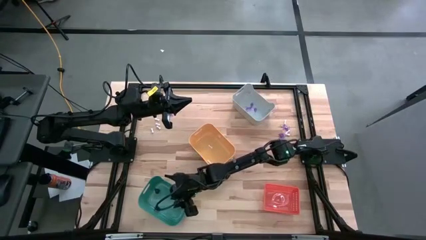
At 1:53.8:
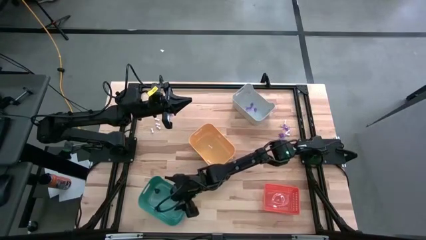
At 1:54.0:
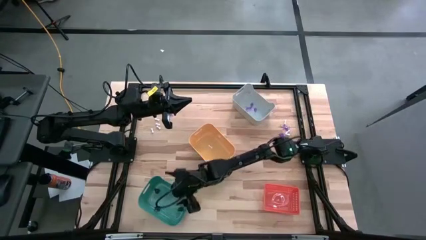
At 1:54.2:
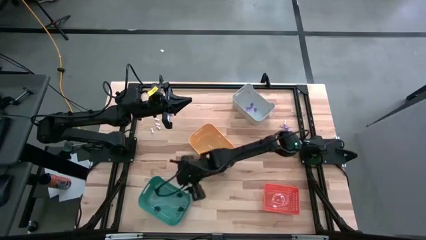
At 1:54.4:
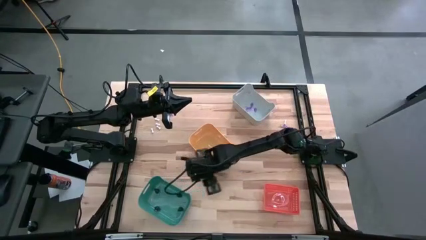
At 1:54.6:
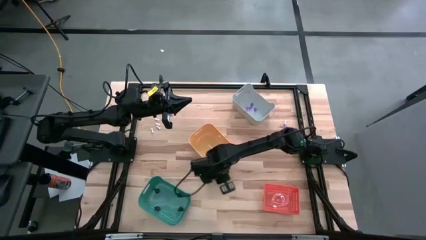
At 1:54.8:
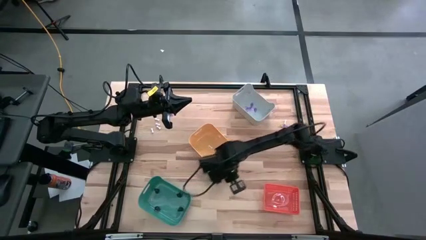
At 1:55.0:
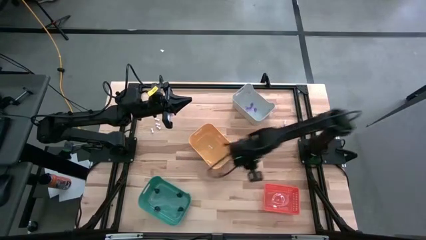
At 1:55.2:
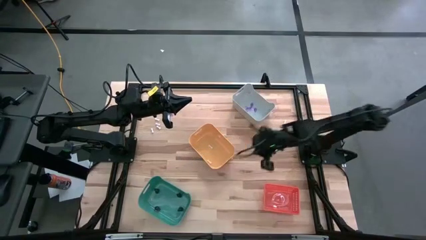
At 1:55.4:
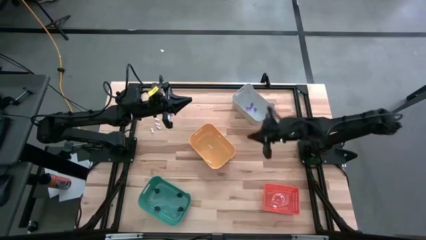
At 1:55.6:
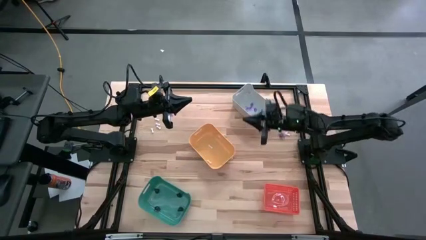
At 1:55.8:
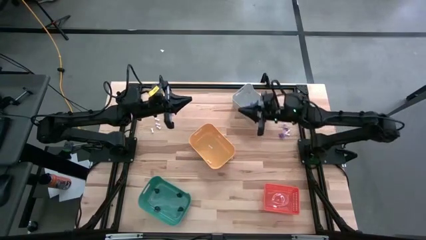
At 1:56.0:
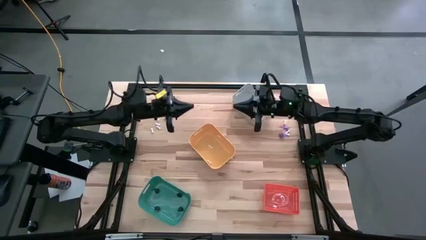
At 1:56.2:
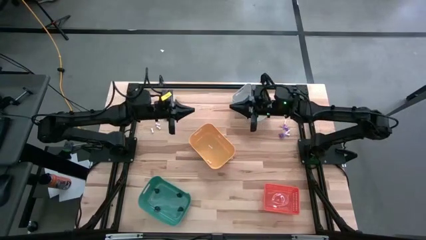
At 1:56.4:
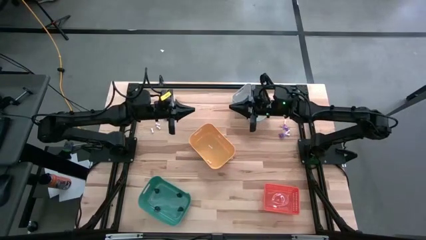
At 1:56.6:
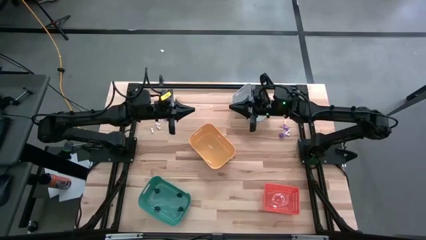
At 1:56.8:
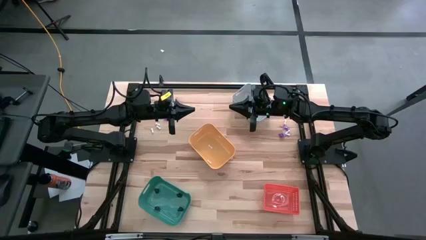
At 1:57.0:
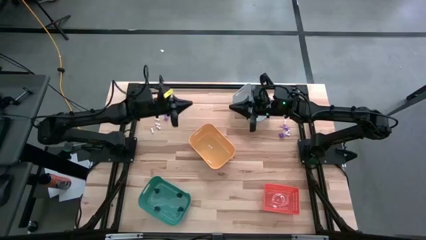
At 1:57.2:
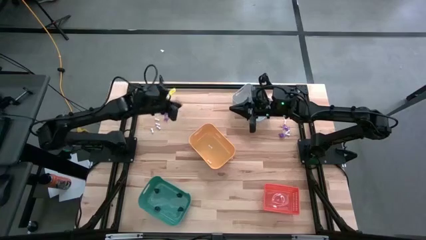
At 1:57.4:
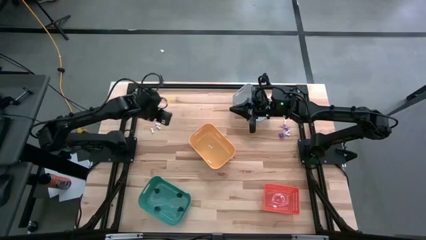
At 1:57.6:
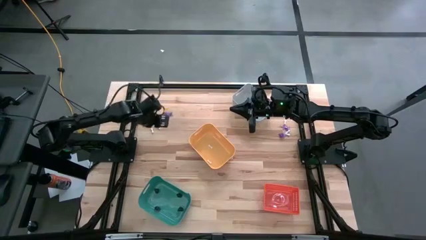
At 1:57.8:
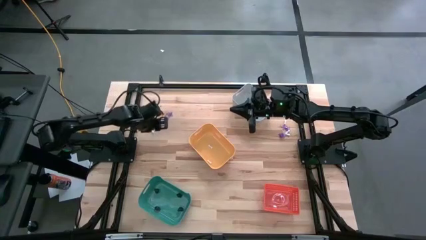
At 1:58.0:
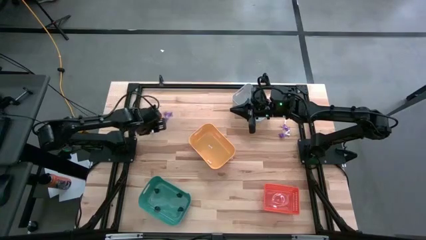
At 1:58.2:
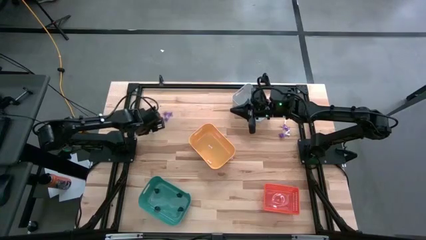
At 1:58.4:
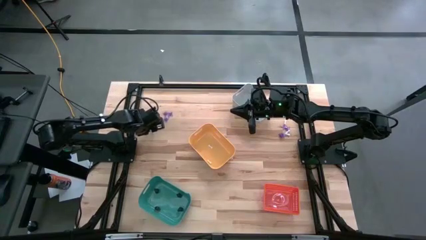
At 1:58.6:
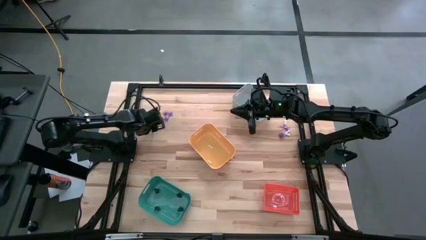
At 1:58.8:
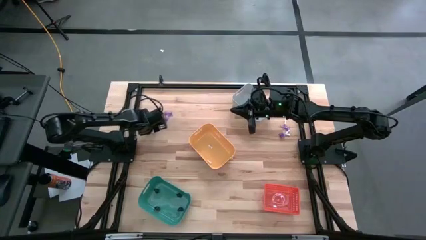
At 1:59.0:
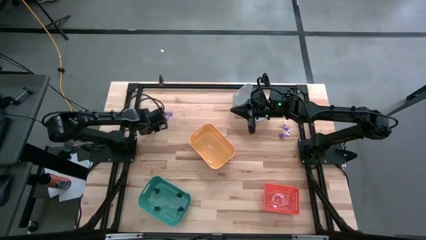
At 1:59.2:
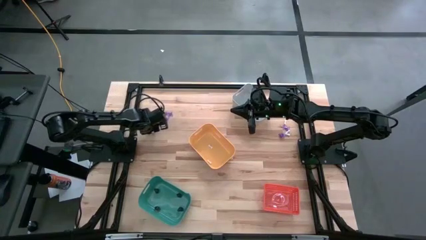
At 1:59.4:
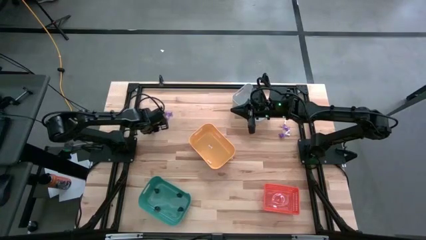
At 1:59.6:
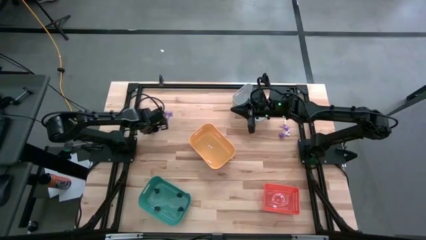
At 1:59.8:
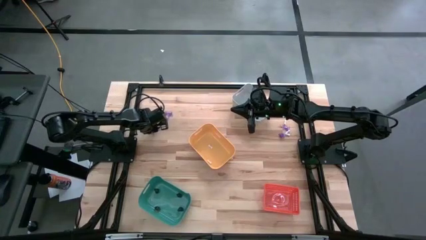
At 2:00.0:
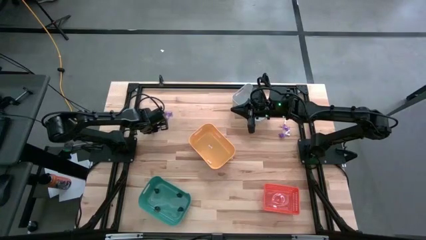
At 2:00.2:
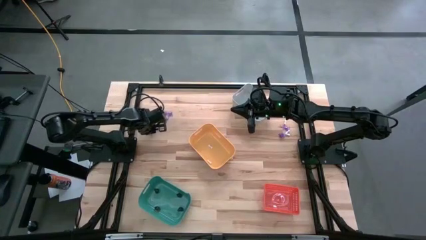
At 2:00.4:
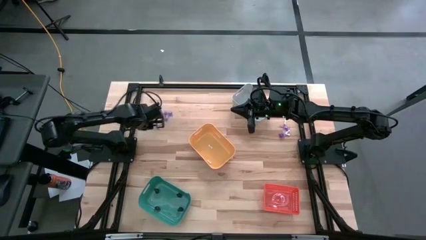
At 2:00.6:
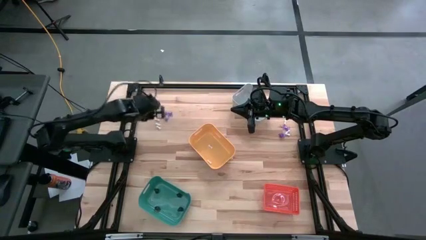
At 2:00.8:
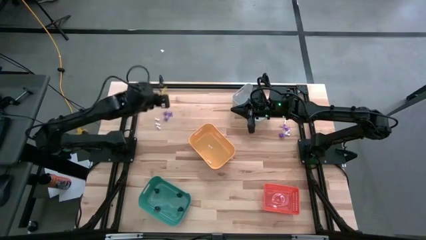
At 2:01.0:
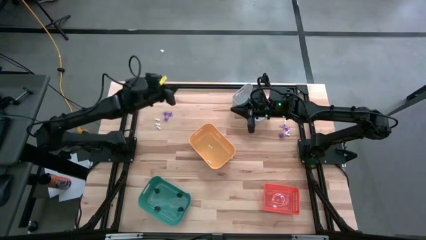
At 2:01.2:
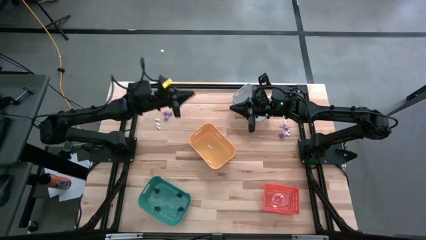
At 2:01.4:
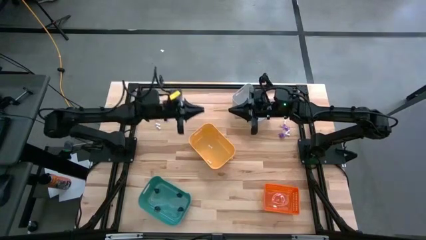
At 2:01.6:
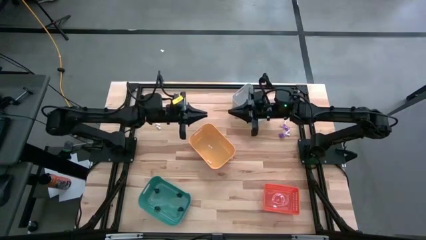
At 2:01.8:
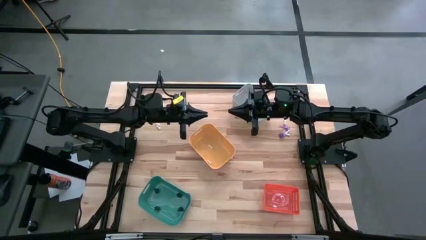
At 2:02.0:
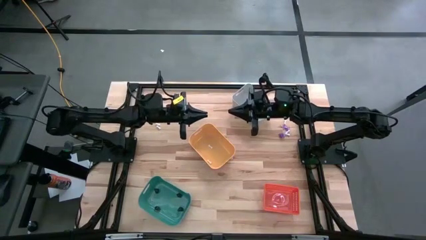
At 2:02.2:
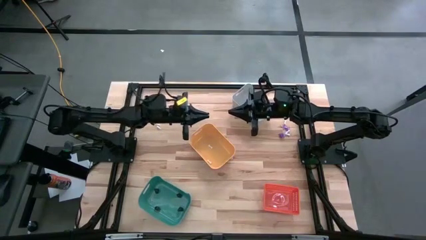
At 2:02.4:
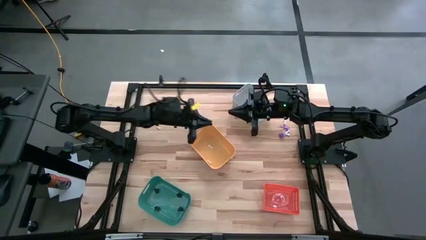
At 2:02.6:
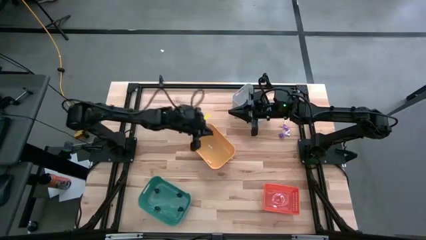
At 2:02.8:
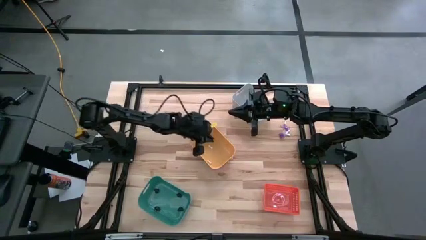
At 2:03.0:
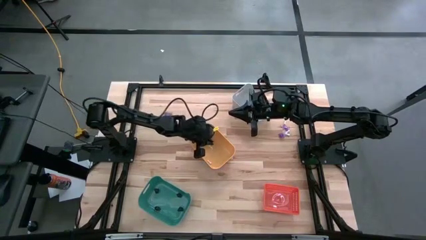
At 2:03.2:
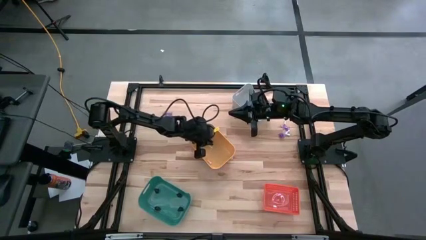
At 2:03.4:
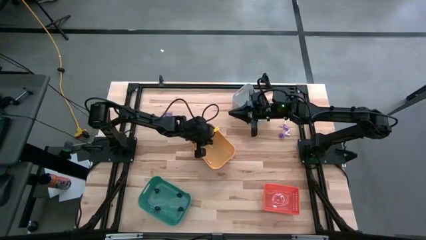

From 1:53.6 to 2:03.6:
Task: Sort Halloween decoration
Put the white bone toy into the yellow bin

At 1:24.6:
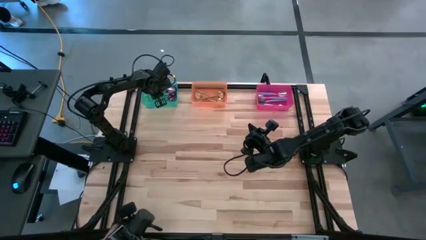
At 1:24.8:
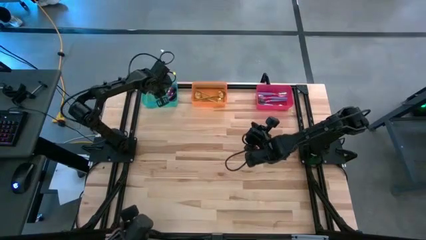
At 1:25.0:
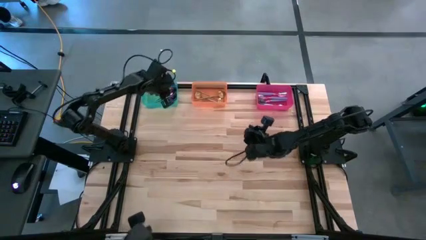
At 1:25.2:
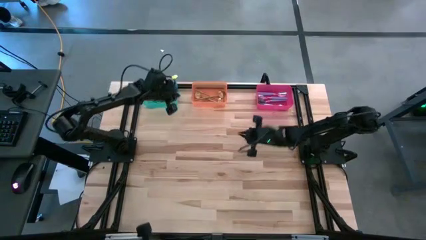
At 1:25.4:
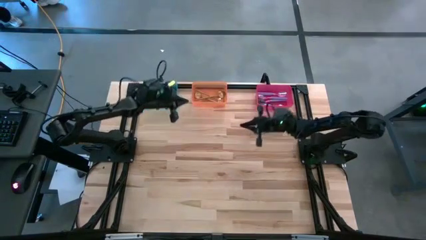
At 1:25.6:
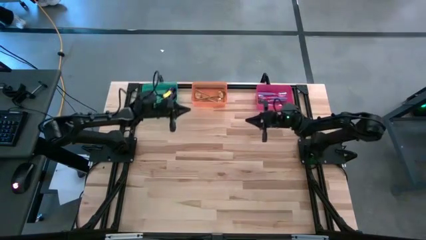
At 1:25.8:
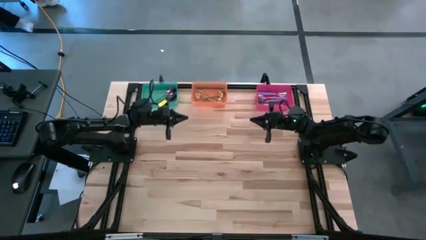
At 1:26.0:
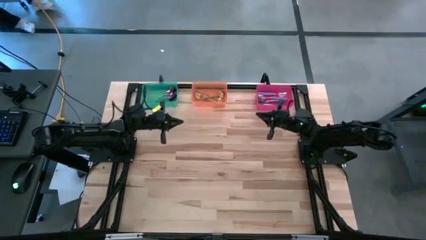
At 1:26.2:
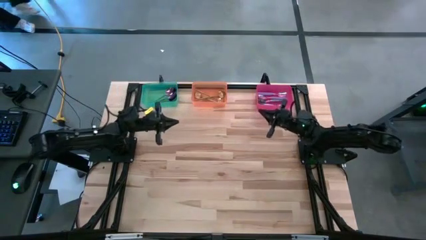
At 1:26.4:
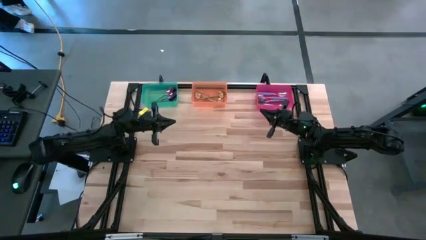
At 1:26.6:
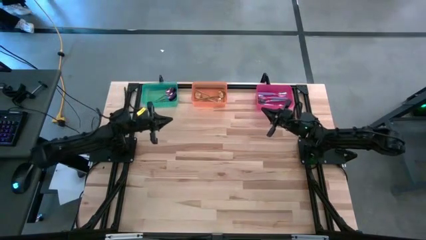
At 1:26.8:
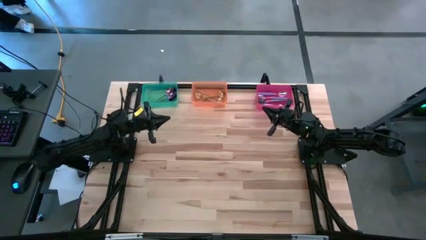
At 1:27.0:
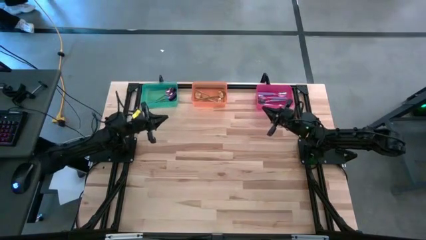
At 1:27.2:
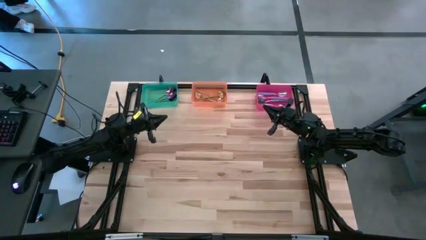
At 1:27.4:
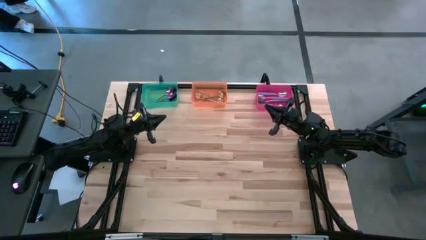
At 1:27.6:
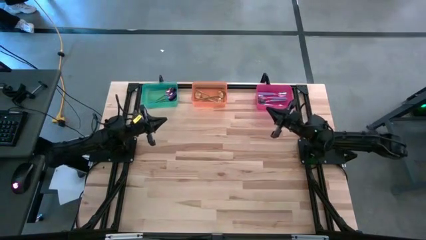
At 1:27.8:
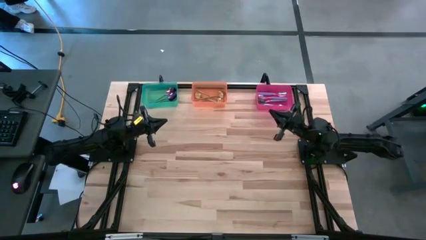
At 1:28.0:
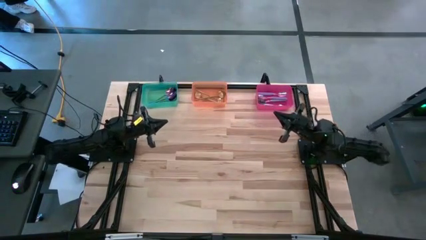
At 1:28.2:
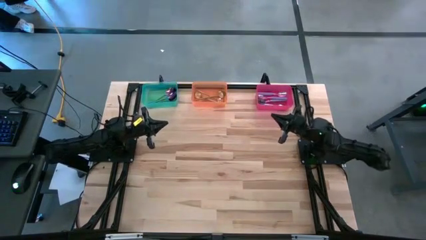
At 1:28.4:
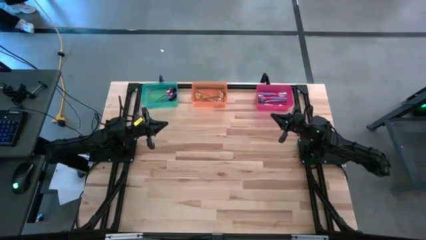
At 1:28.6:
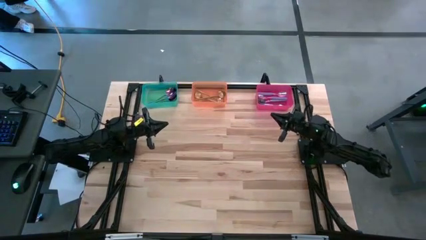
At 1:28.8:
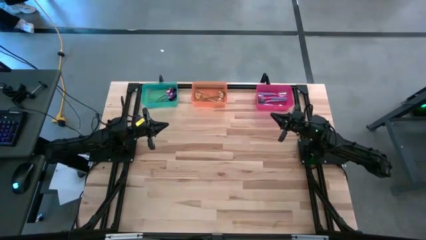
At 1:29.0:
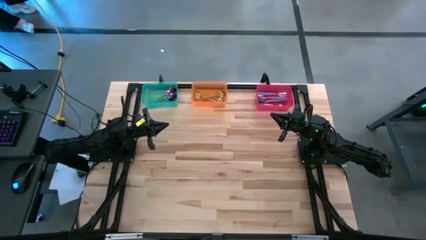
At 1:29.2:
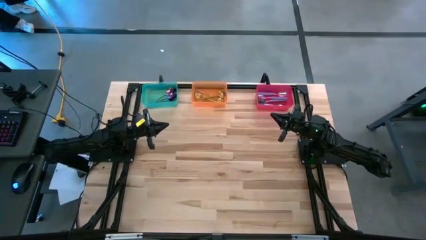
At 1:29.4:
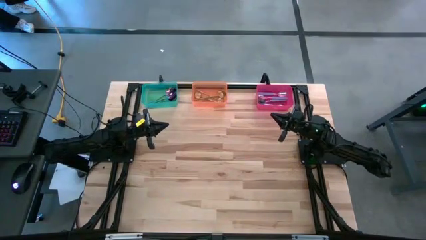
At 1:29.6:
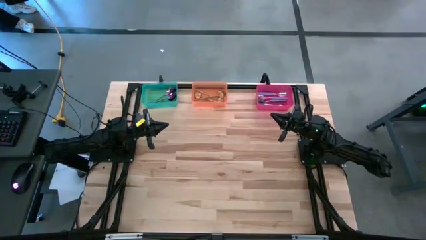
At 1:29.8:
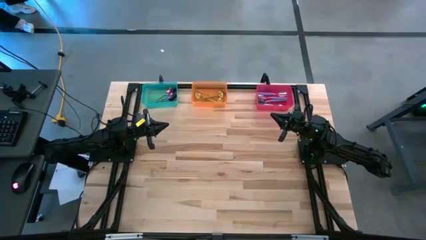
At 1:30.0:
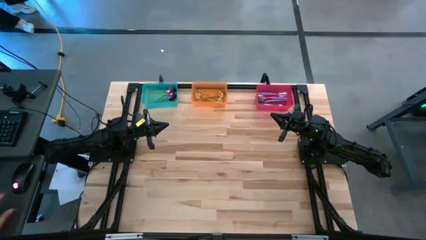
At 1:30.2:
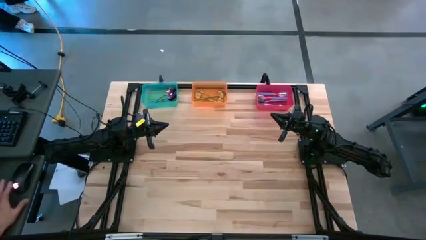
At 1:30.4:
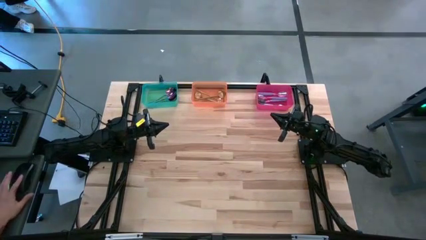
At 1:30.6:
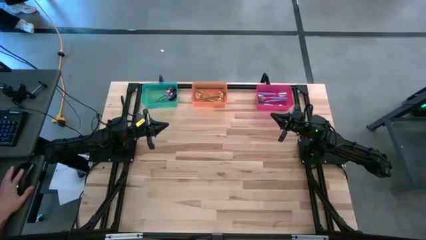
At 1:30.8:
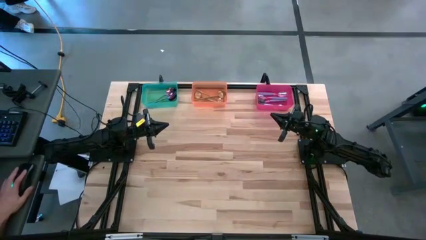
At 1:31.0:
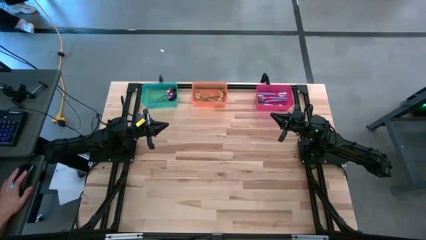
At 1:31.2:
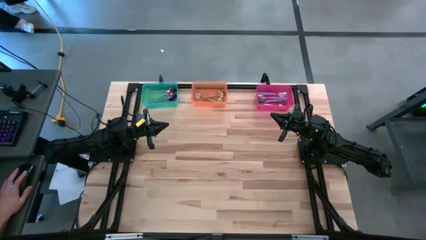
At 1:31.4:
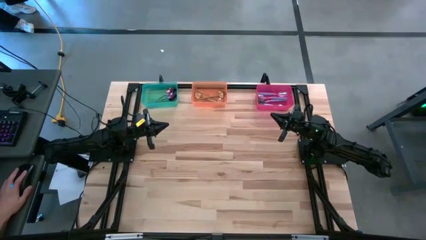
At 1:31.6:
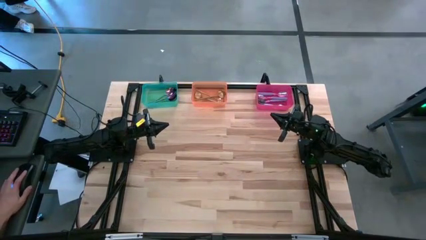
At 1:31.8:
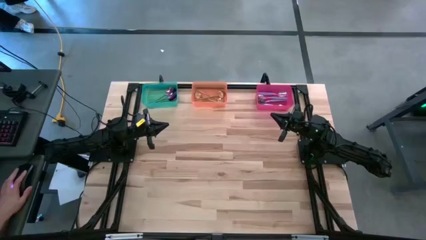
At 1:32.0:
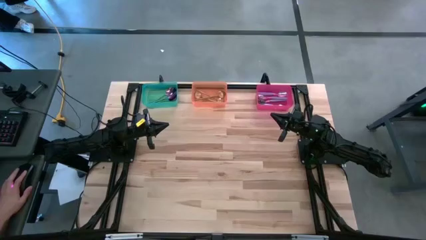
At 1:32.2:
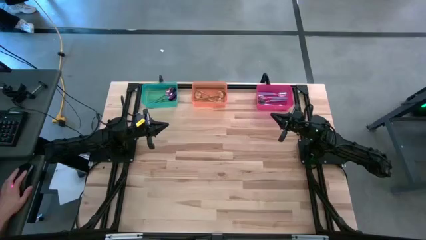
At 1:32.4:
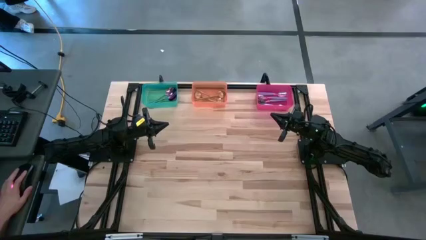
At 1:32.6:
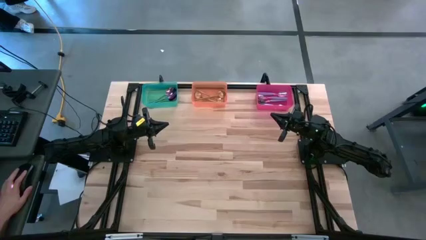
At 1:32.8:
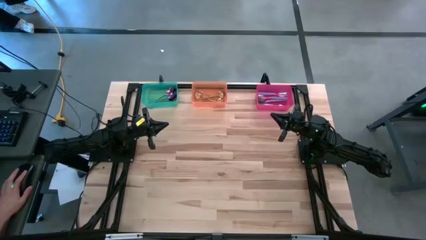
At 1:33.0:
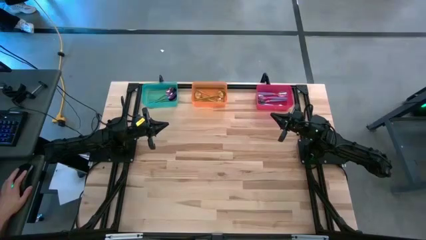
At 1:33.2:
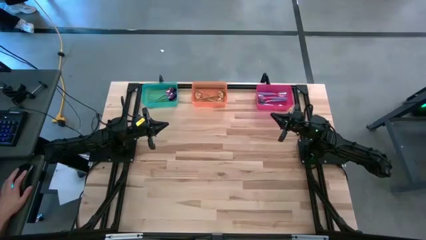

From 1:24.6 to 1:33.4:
Task: Sort silverware by color (type)
Return to Home Position
